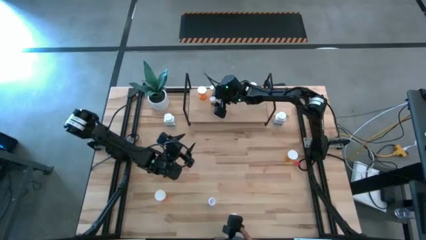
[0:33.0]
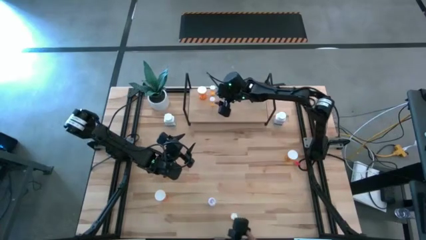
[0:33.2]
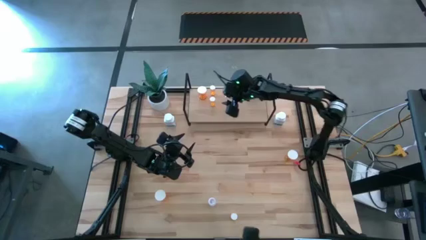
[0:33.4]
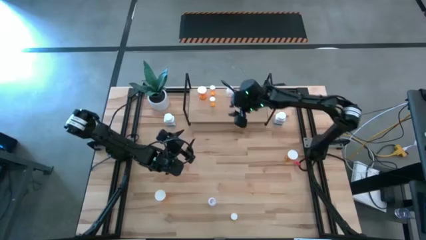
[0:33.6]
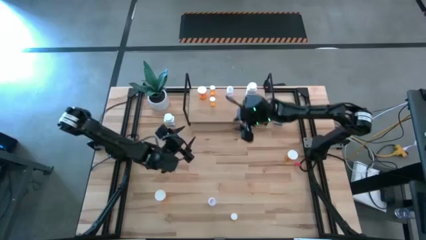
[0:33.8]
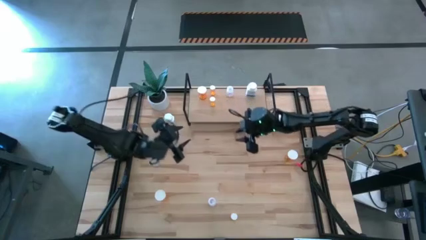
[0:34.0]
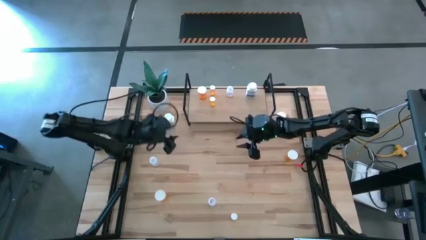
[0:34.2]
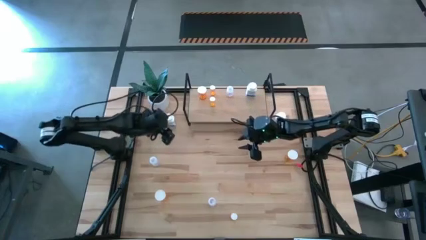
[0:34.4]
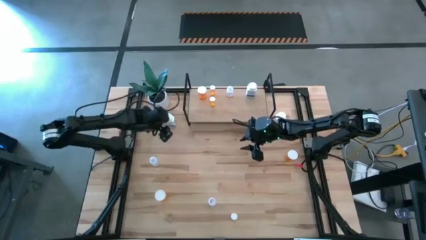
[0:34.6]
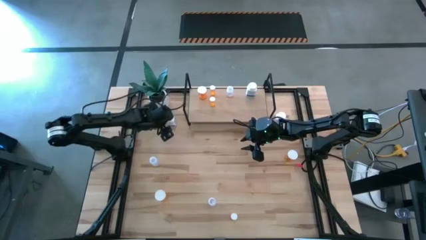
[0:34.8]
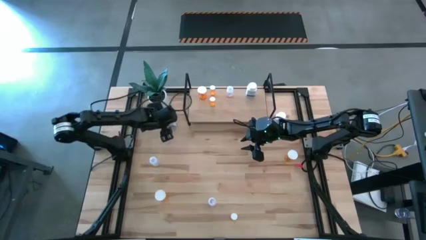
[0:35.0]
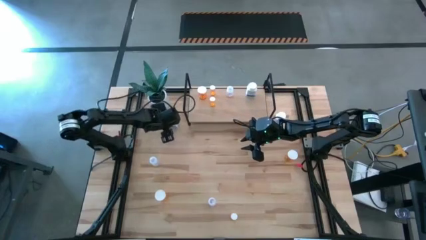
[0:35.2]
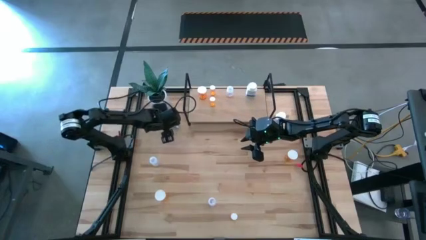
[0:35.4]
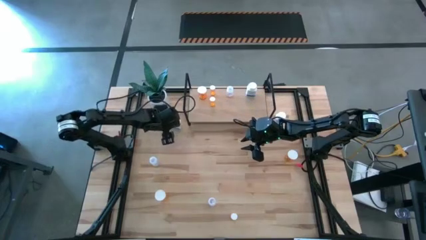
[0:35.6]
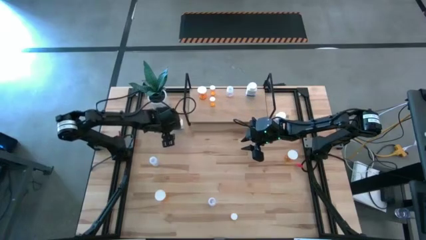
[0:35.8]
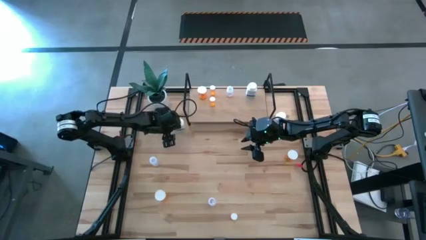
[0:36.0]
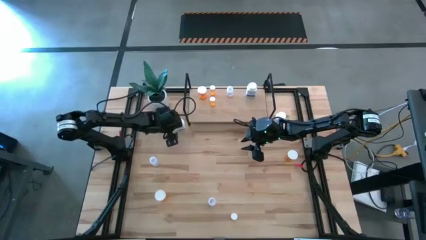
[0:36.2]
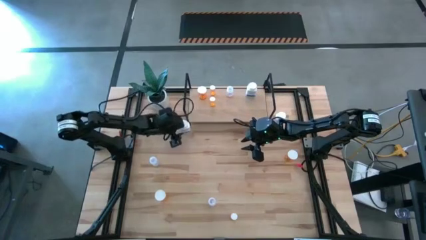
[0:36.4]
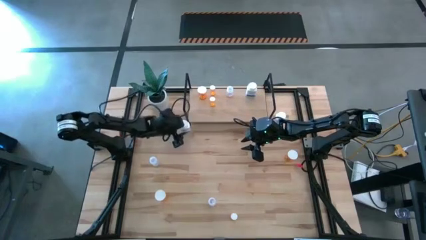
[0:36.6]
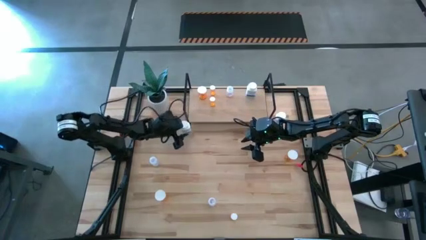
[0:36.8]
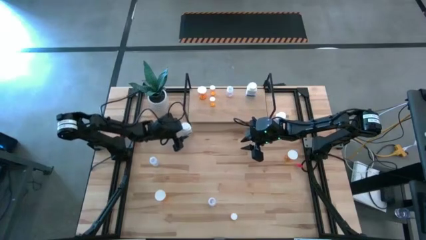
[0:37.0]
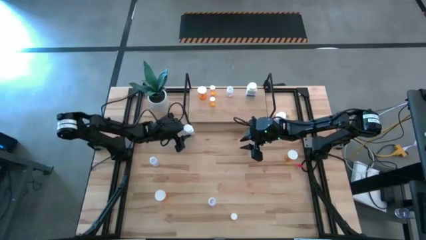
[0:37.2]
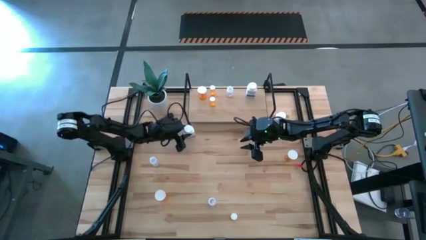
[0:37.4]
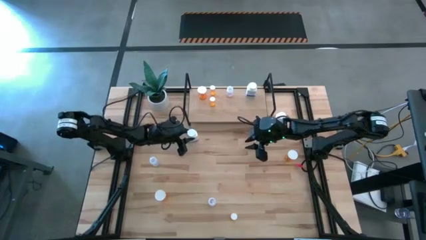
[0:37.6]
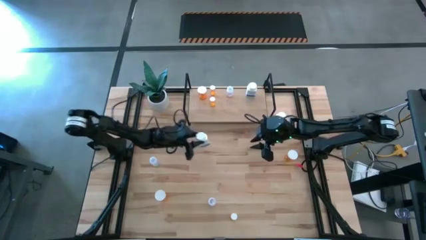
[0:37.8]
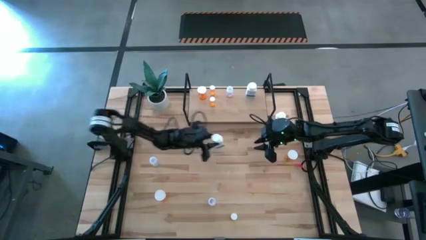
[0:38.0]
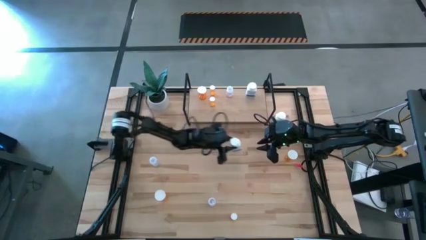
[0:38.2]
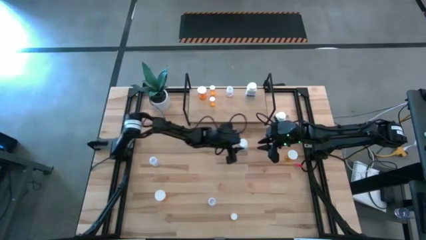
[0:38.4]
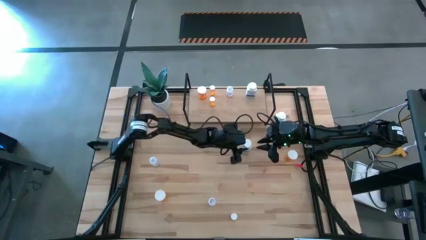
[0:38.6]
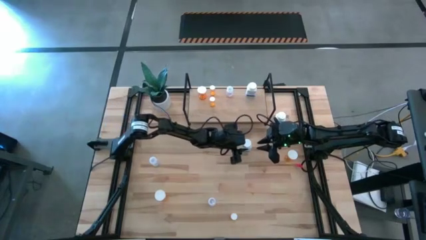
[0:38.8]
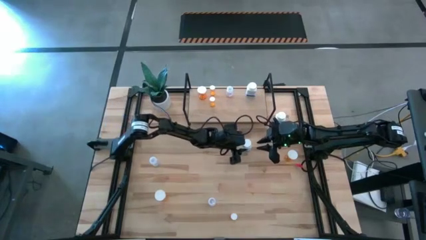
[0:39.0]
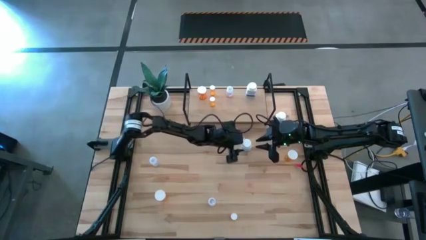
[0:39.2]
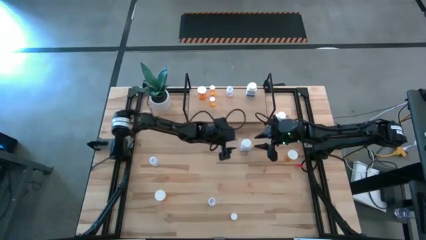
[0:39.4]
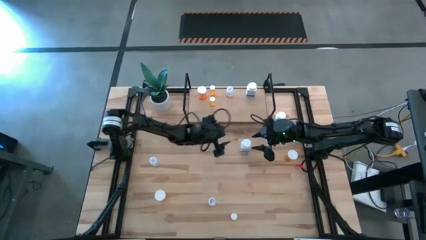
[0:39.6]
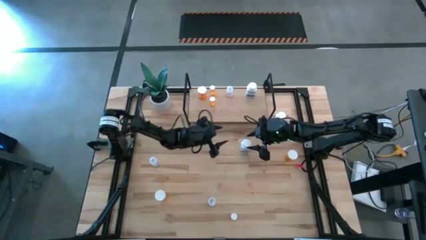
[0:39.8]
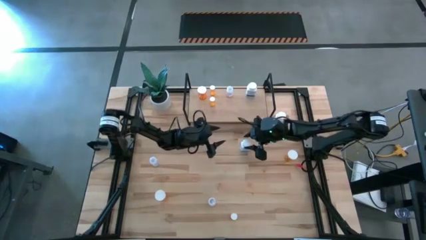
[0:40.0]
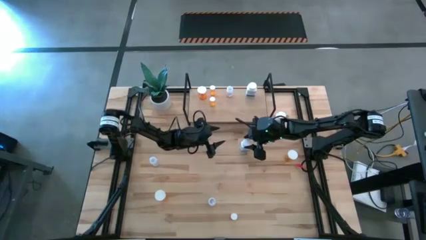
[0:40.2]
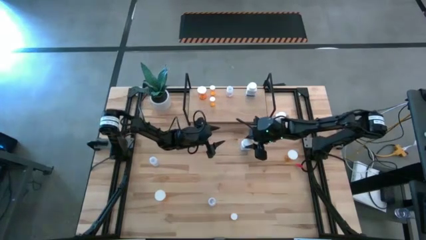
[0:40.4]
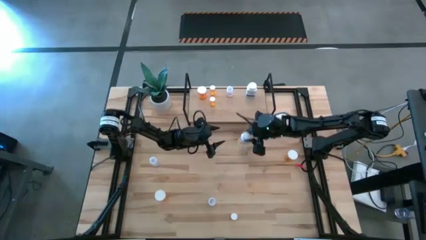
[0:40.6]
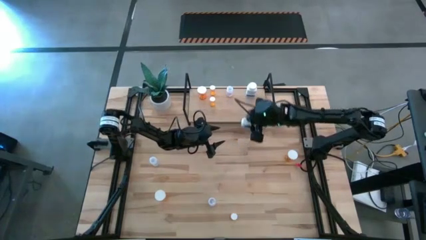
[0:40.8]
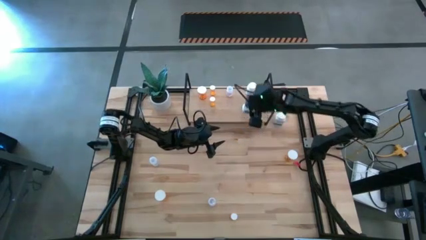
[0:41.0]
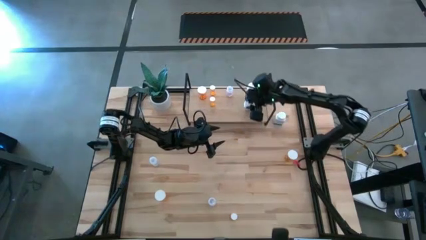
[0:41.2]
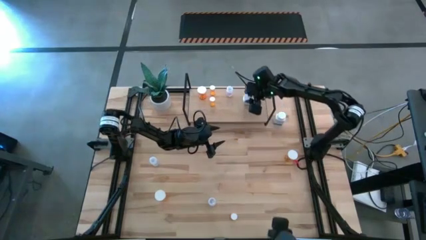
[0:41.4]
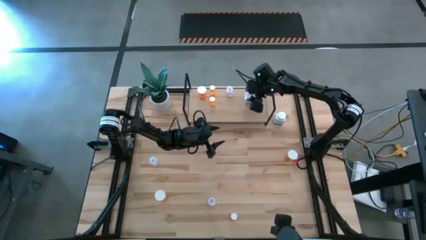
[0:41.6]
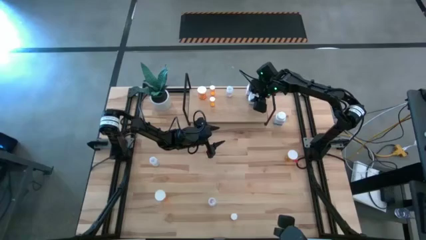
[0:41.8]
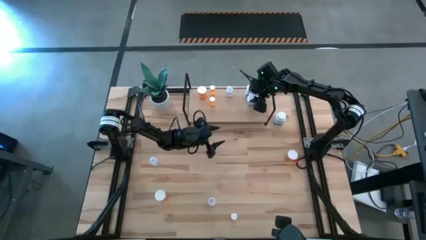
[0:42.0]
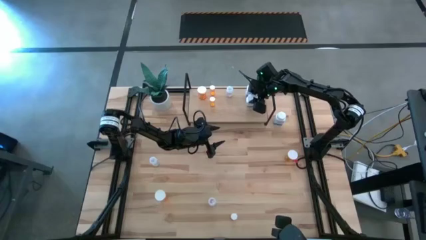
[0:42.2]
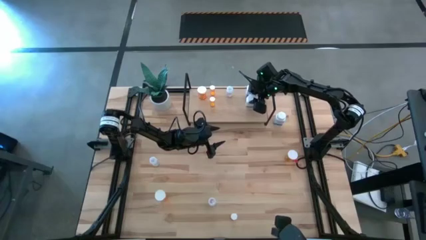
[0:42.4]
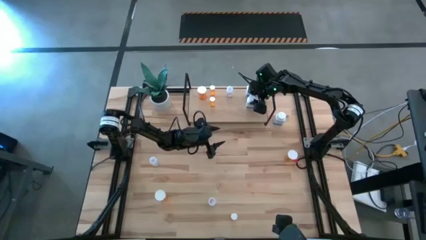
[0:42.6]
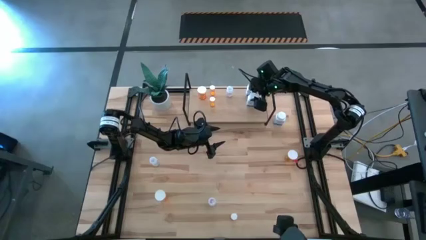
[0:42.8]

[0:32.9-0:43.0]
Task: Pick and place medicine bottles onto shelf by color
Put the left white pill bottle on the shelf aligned with the white pill bottle

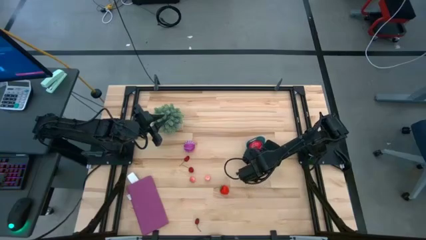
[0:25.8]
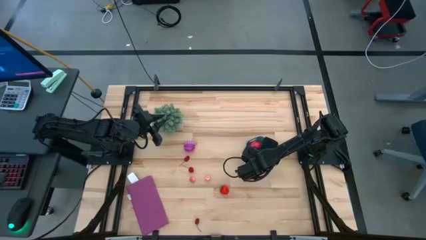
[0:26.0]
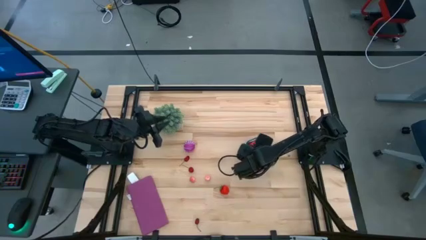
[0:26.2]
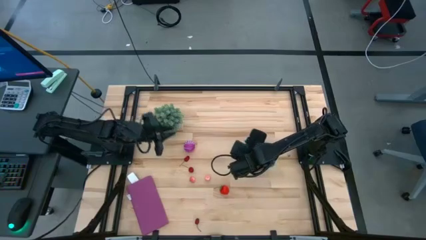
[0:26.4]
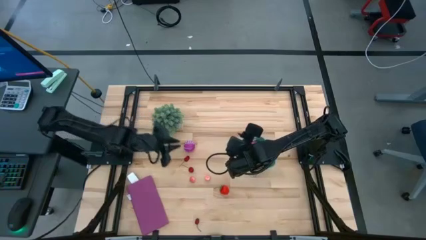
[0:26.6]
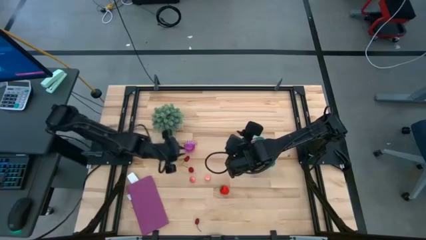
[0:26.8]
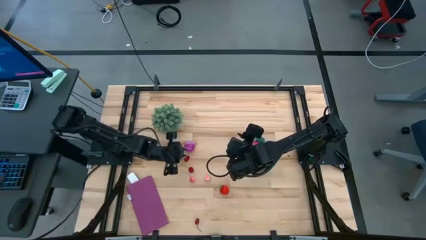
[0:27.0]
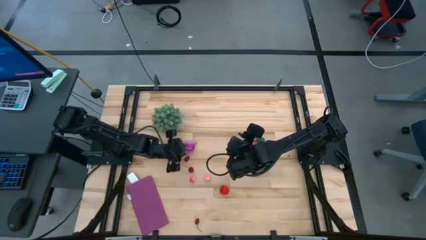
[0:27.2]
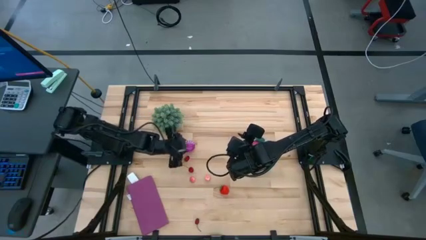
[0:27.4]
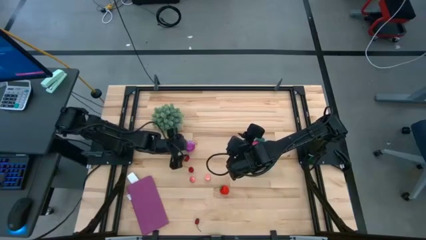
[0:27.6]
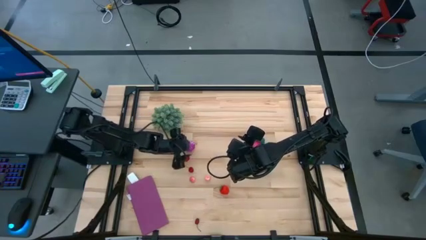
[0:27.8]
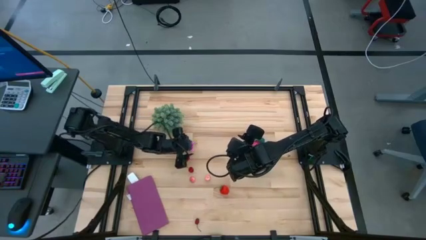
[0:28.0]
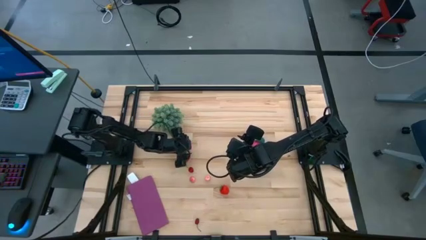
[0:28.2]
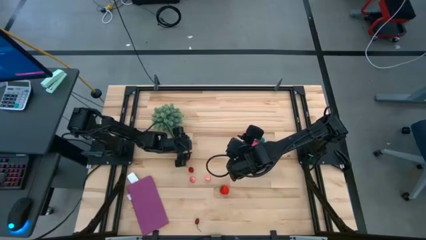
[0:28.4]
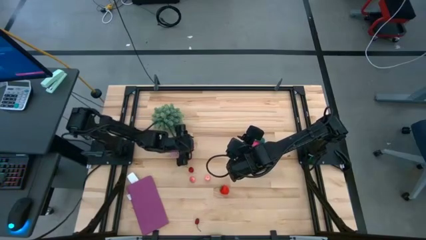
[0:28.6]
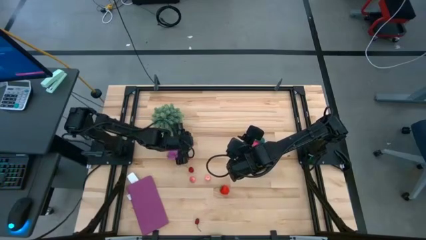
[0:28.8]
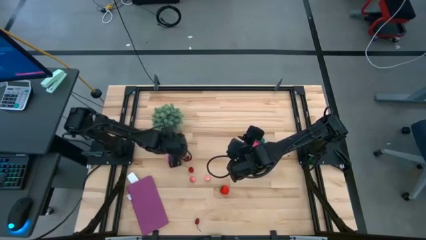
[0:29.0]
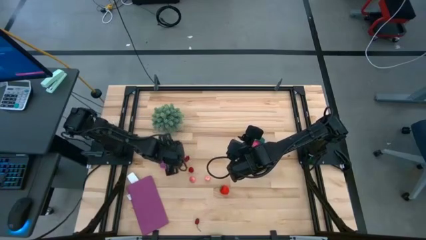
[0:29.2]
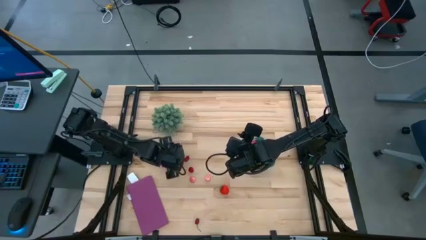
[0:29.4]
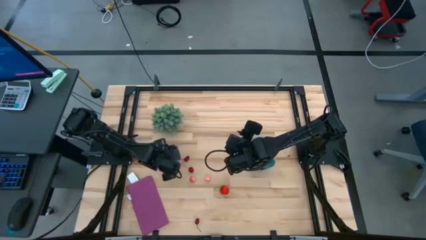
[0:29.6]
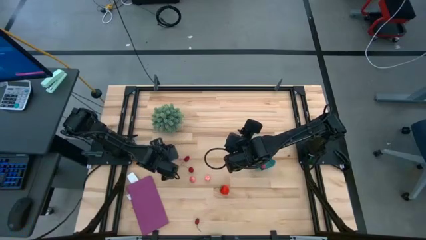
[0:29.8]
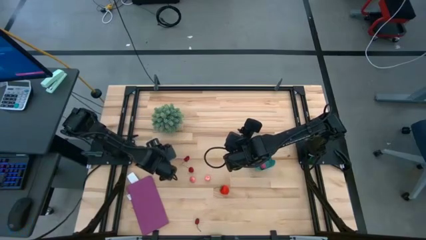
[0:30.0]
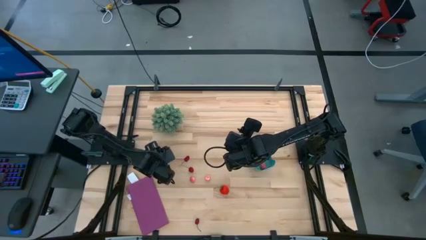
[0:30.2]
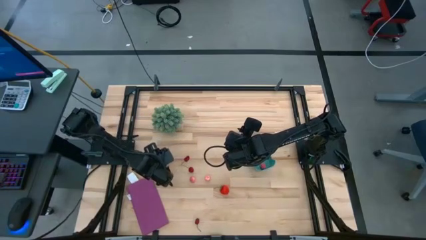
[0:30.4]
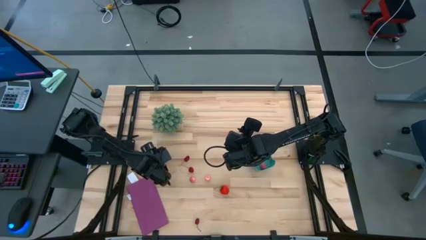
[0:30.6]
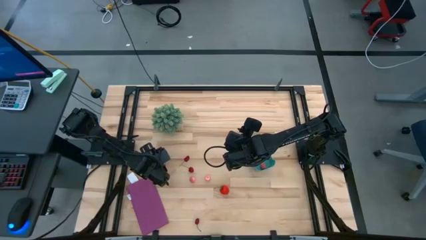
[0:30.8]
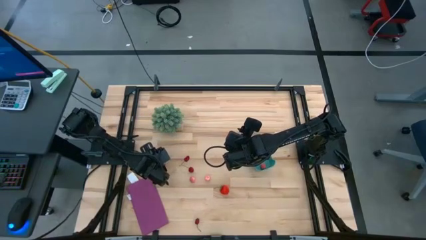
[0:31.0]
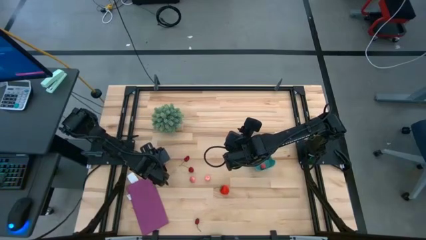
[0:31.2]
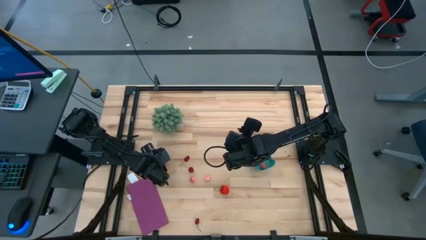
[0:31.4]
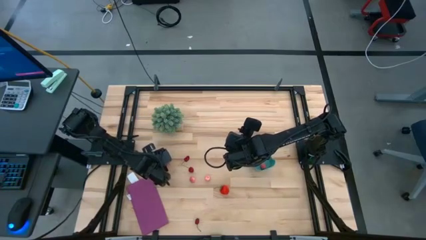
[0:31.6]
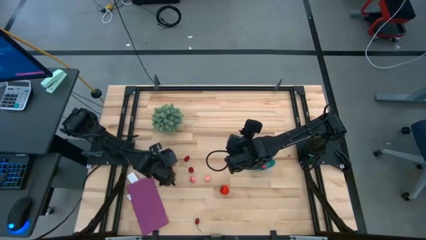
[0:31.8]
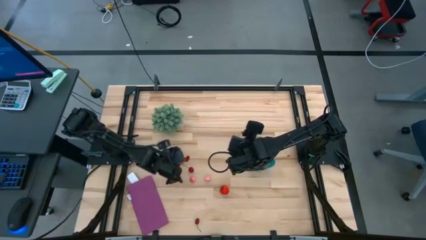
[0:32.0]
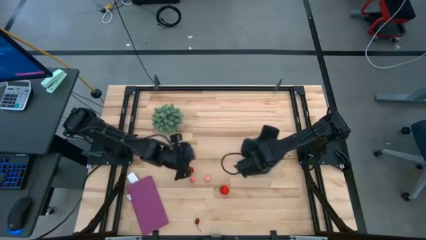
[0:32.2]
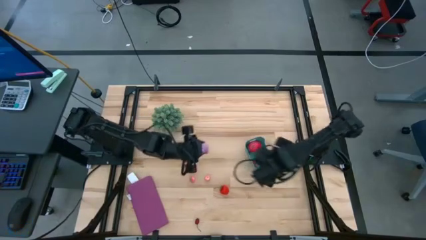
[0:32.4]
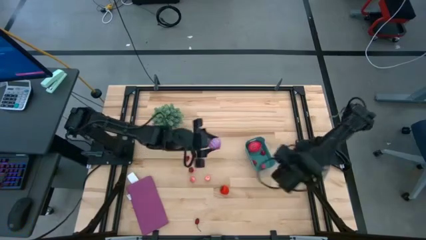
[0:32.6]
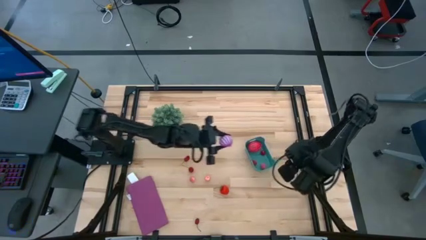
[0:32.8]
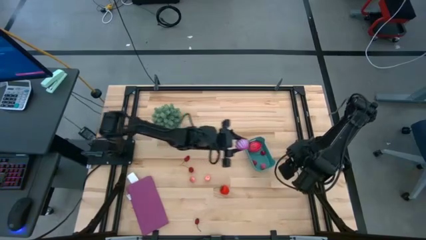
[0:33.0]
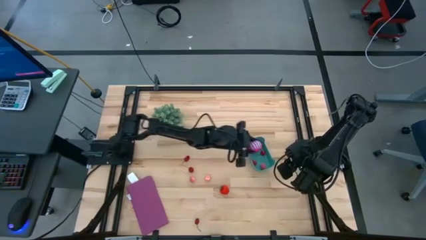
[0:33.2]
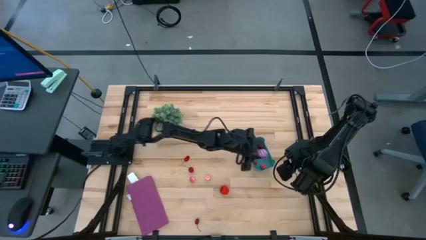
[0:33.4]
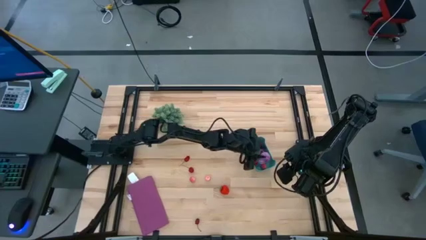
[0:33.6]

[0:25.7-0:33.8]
Task: Pick and placing Produce into tupperware
Put the onion in the basket
